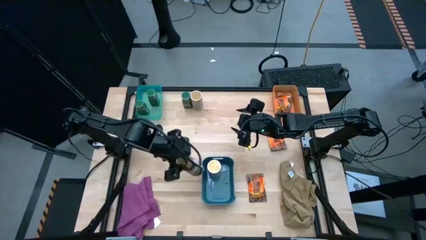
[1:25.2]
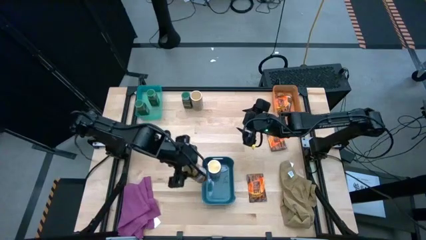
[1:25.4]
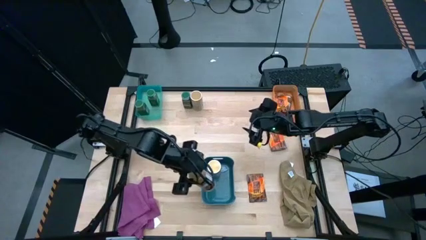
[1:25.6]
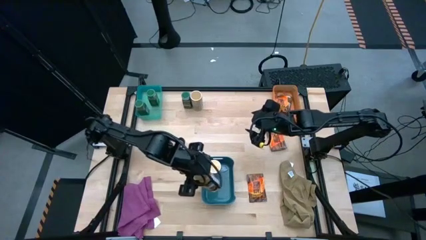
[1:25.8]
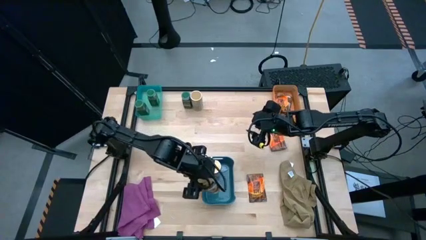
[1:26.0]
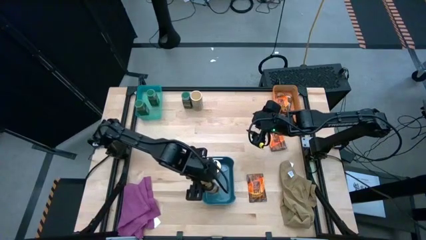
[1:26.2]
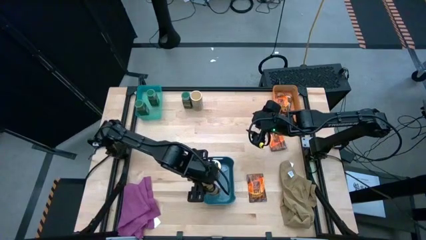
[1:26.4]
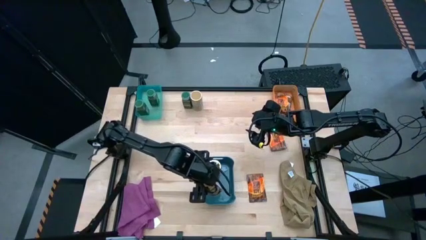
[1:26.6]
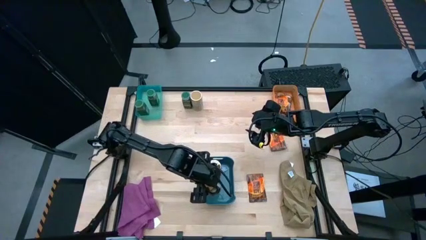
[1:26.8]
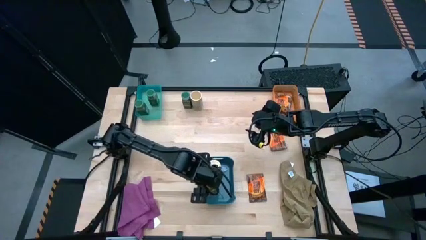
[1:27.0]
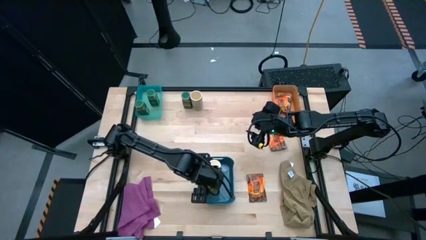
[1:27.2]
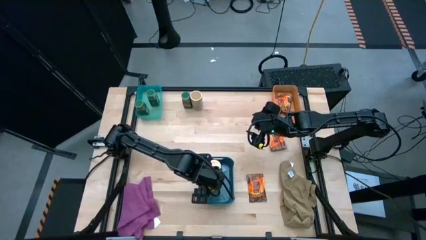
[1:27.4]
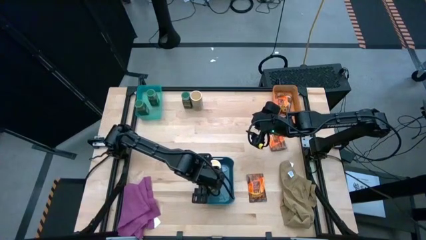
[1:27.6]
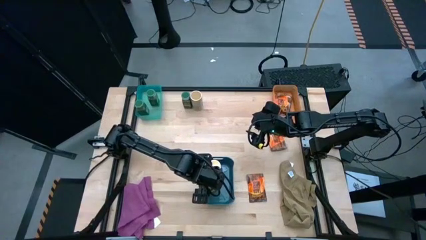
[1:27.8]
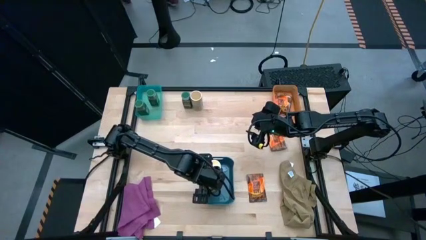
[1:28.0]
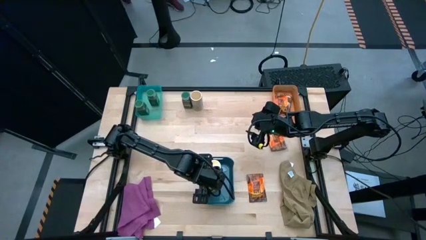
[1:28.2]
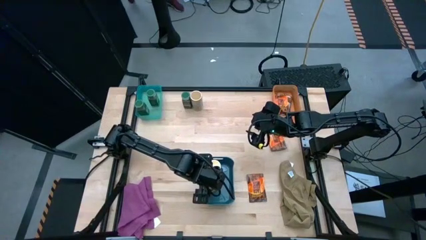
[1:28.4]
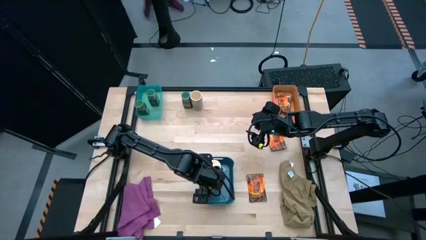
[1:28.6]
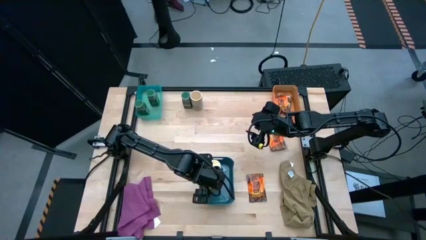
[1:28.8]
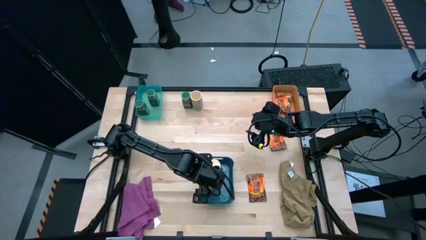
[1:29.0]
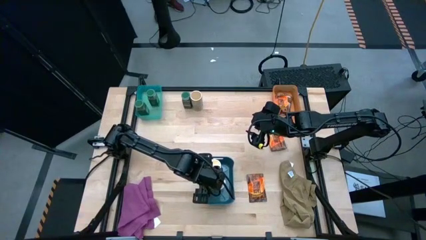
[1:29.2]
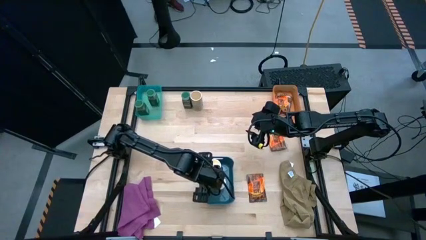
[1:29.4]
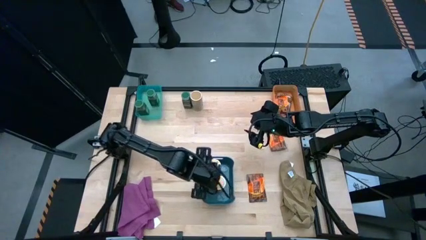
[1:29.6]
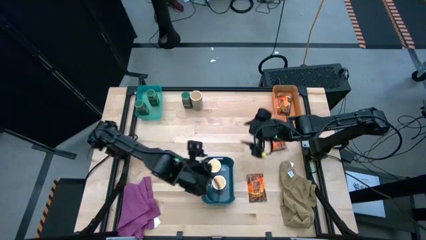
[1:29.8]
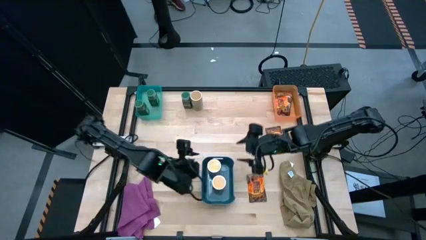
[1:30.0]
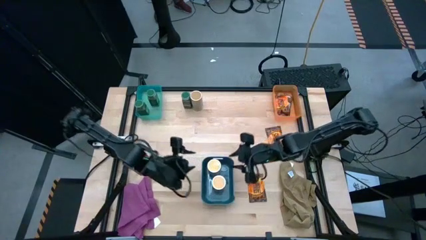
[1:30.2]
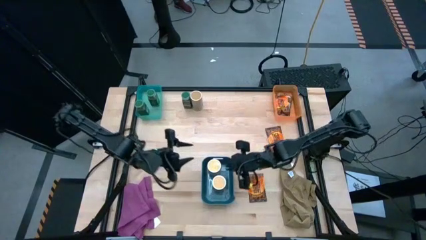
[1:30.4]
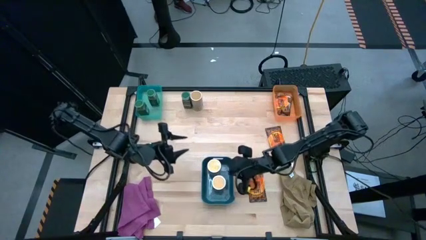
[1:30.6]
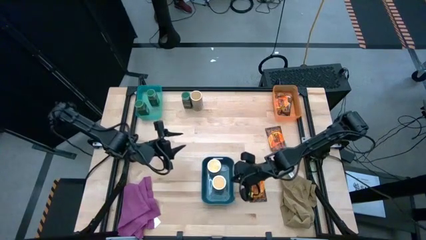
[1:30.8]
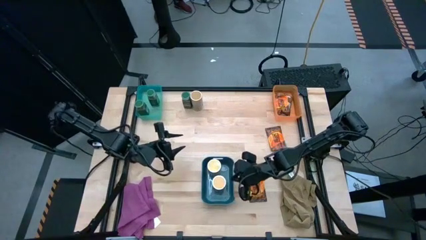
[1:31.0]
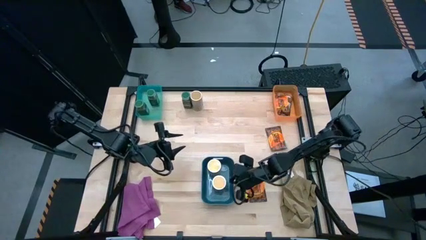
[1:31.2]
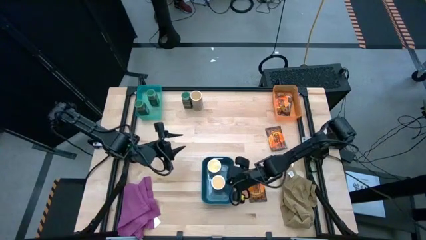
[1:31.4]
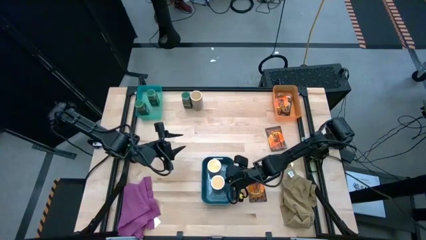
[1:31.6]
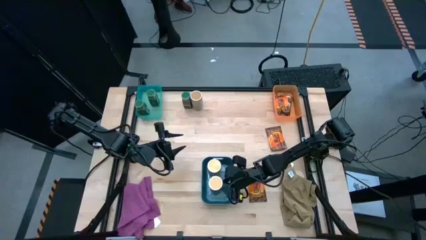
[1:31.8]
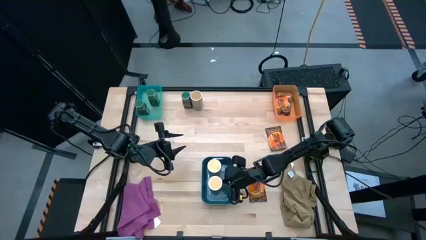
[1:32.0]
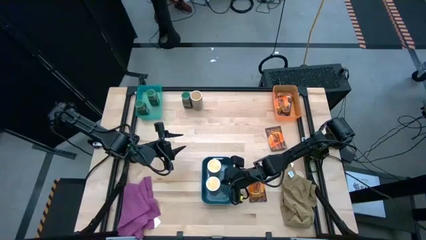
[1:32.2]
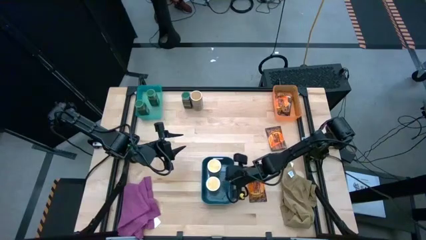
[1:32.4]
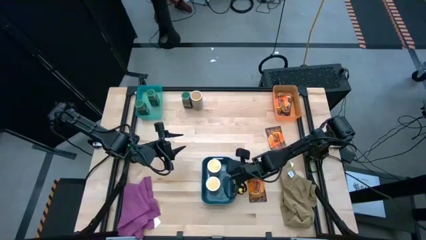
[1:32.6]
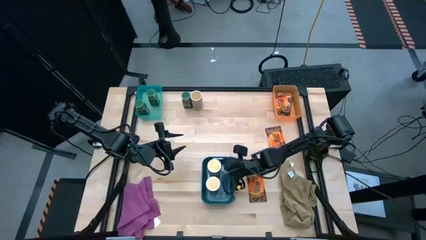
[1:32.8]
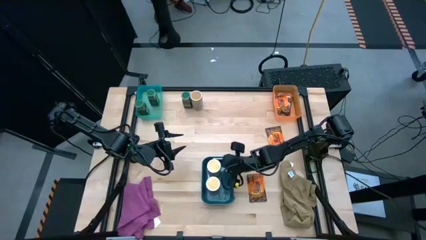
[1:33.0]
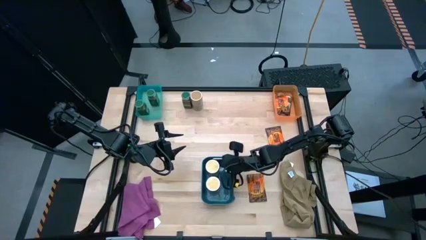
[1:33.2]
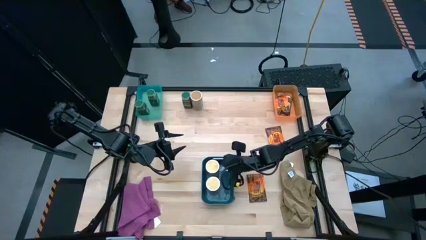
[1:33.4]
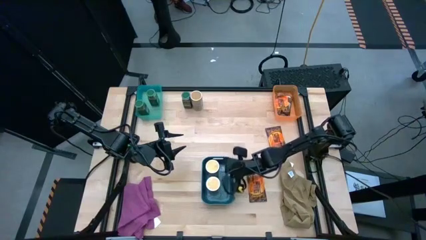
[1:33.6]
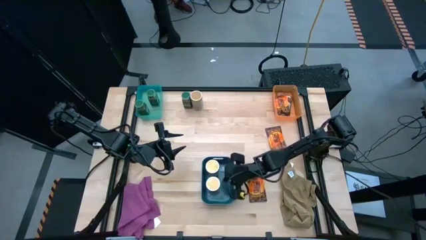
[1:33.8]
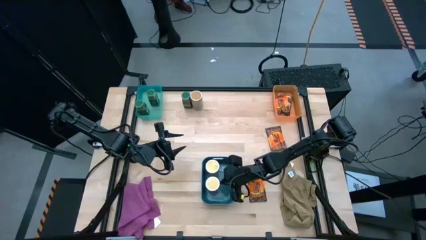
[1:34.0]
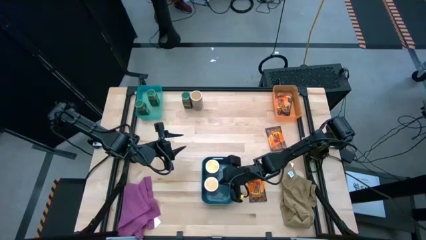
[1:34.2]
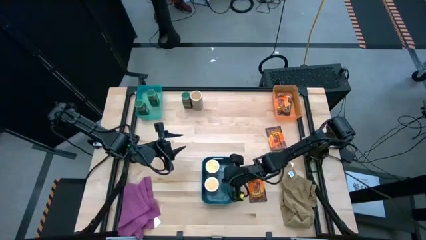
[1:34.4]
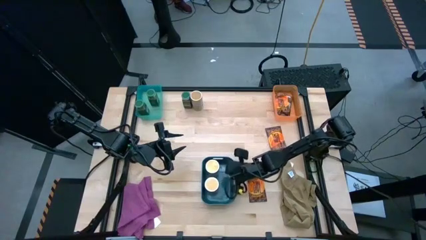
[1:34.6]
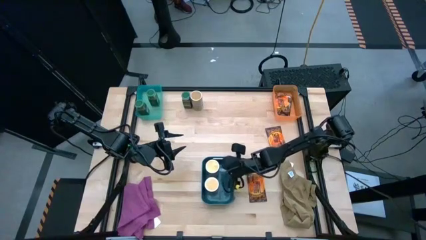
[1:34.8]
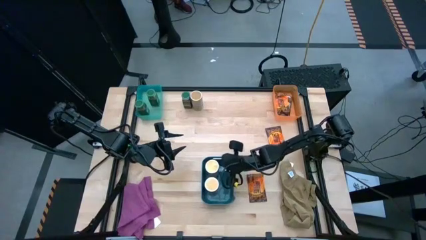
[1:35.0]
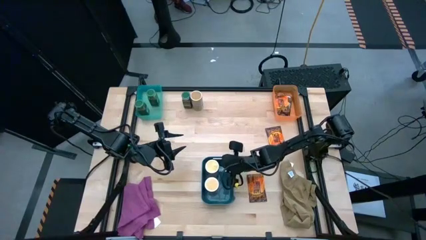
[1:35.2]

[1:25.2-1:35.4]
Task: Sort spices by type
Put the gold seasoning bottle into the blue bin

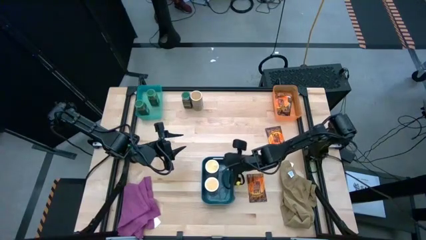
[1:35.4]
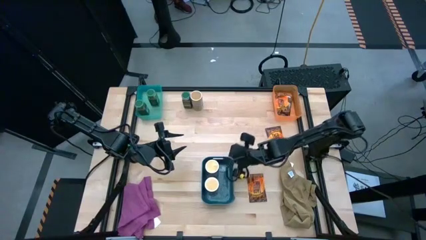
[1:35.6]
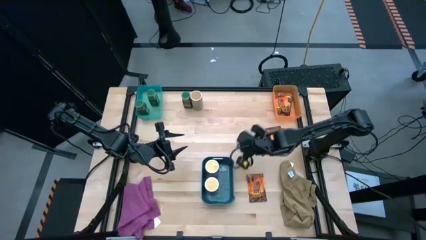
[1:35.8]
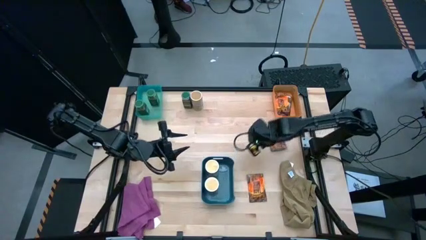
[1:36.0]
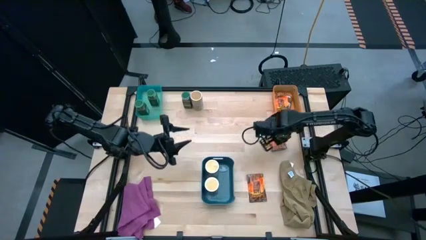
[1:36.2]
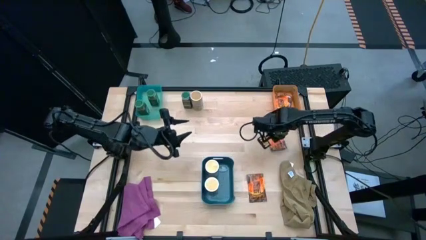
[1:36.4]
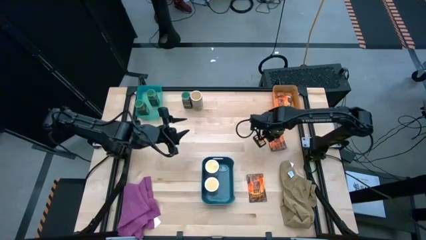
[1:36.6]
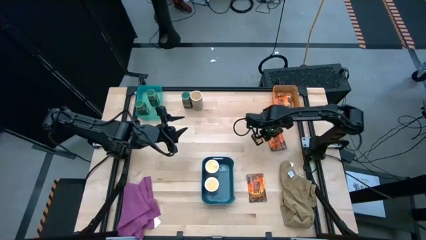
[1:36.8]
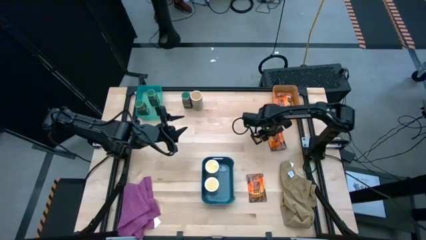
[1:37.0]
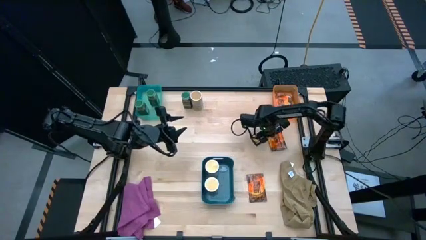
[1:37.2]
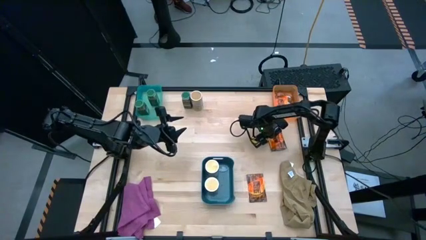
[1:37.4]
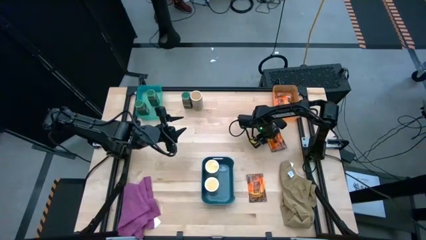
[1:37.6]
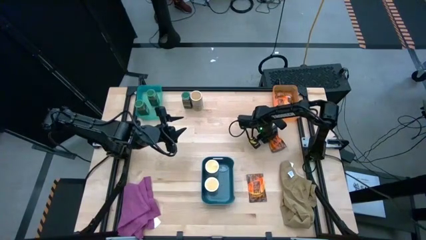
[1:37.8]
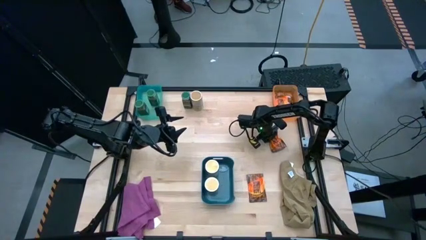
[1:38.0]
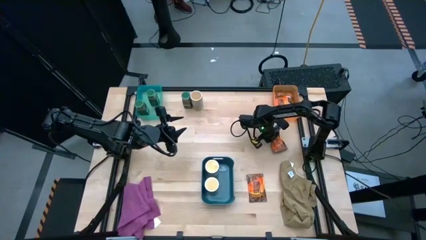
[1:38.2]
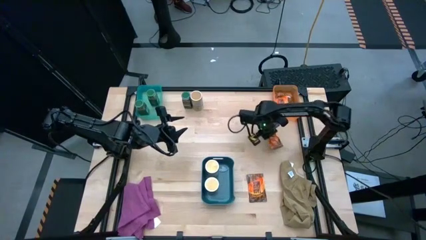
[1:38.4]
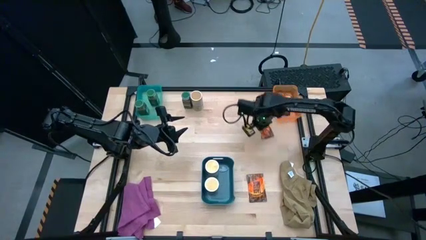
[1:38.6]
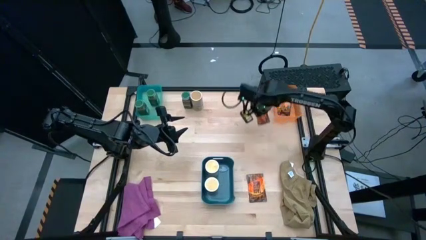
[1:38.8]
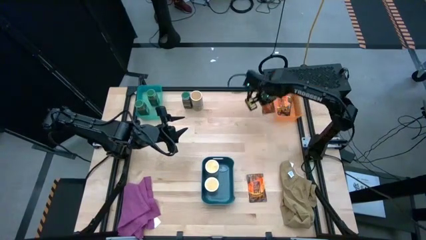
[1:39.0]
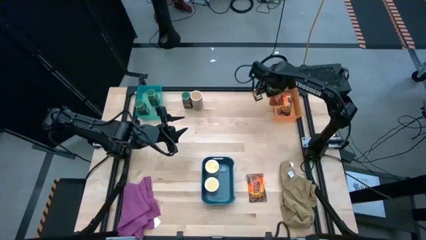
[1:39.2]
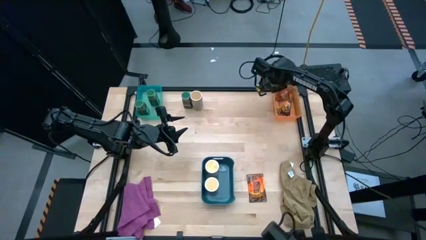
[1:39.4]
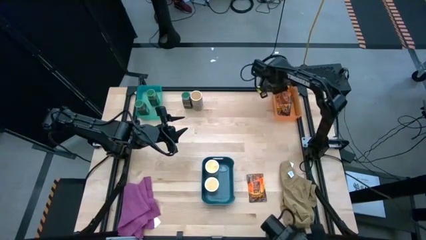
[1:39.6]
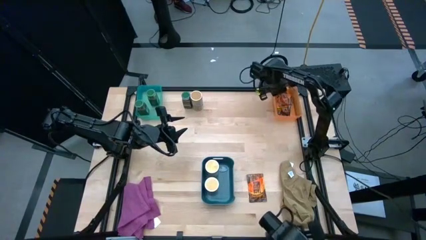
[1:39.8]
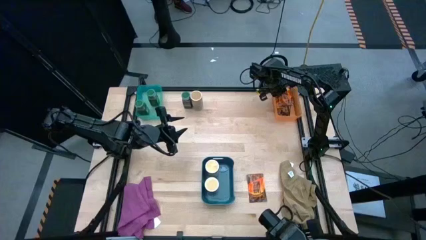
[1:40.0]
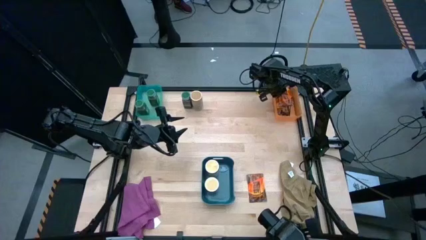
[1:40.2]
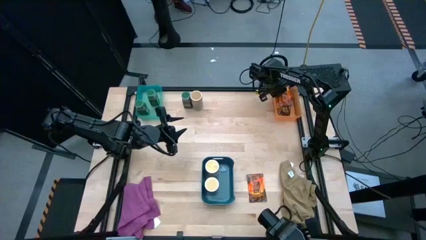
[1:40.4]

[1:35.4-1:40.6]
Put the orange seasoning bag into the orange bin
